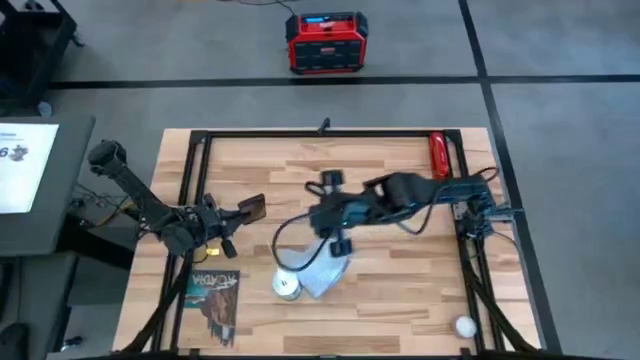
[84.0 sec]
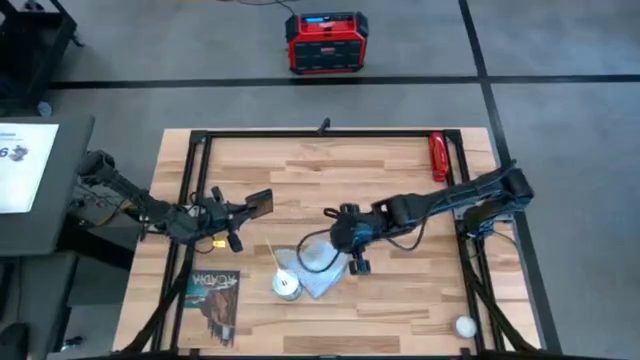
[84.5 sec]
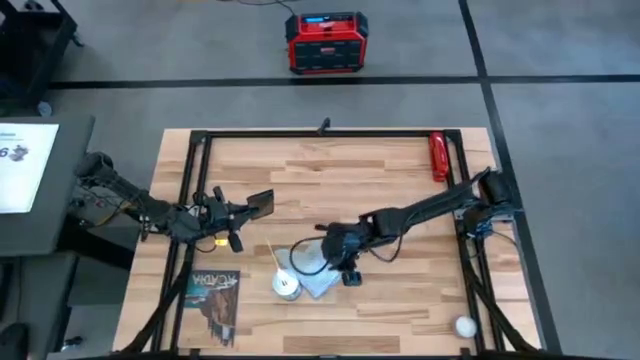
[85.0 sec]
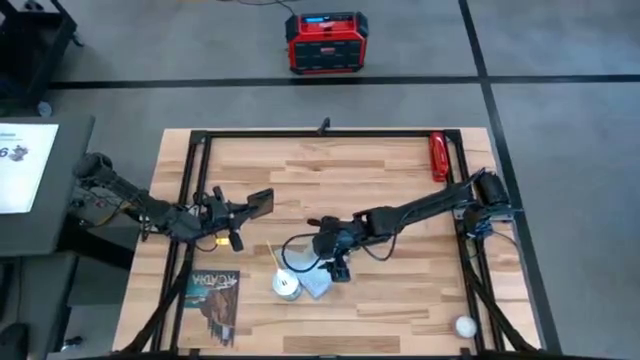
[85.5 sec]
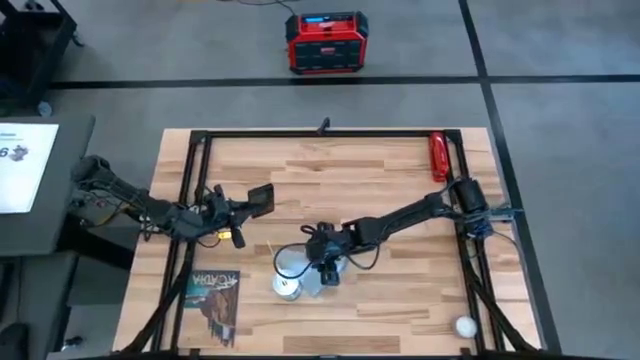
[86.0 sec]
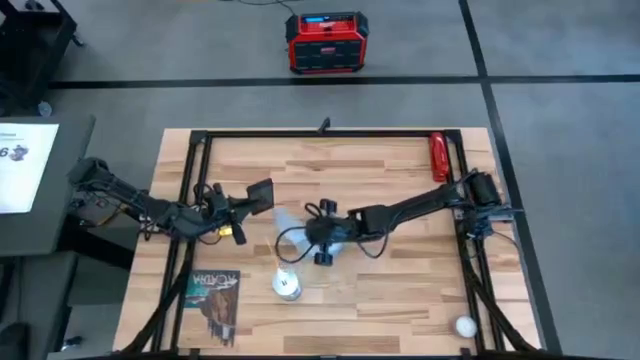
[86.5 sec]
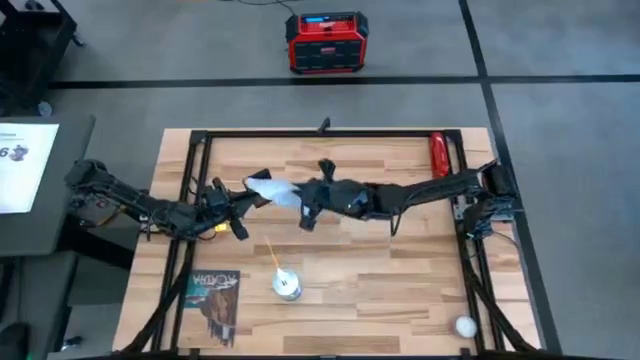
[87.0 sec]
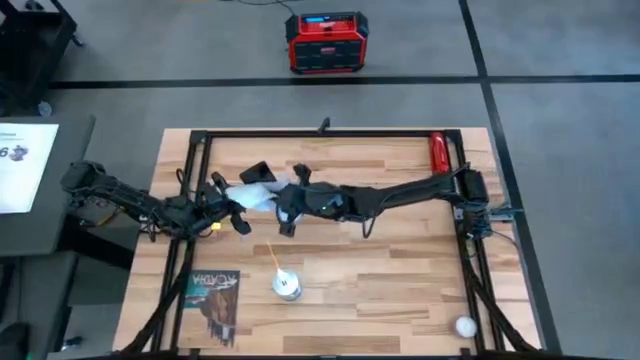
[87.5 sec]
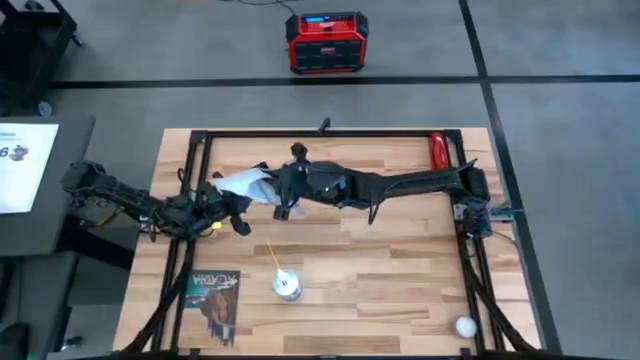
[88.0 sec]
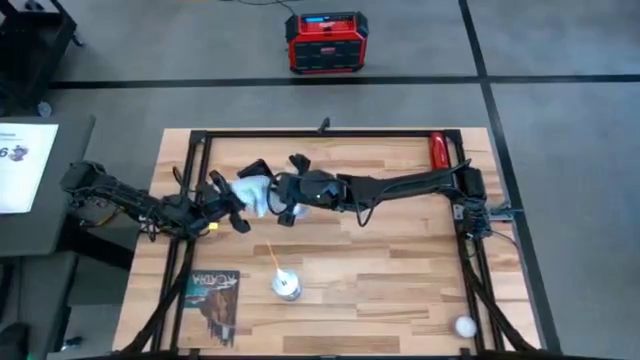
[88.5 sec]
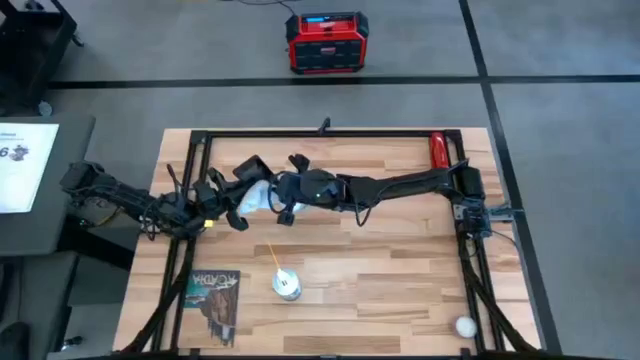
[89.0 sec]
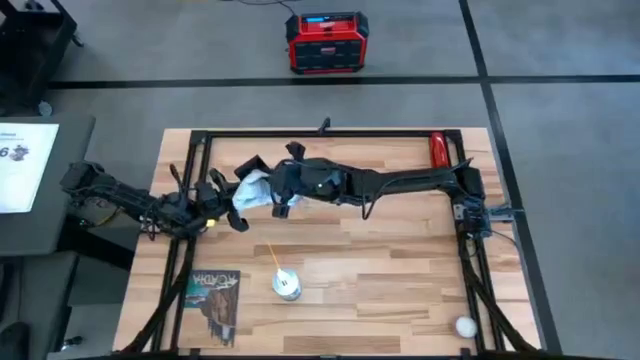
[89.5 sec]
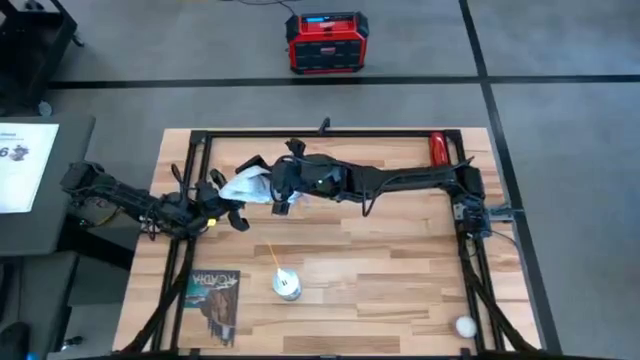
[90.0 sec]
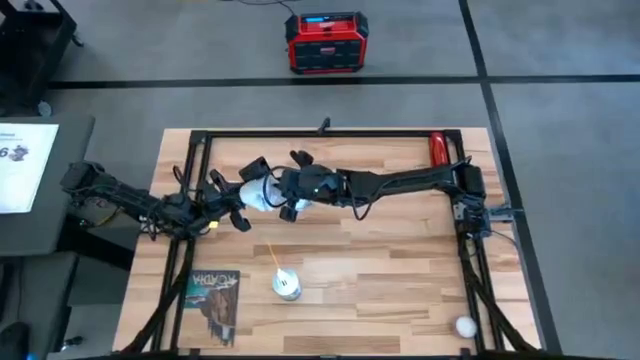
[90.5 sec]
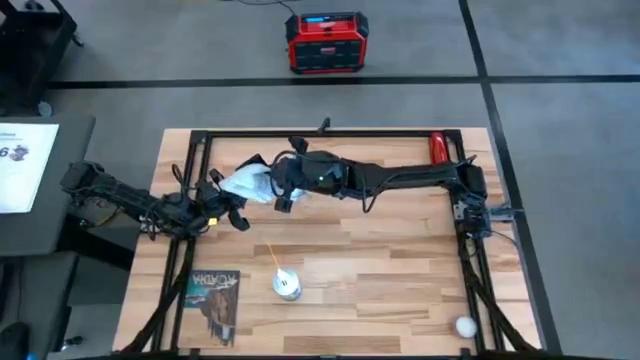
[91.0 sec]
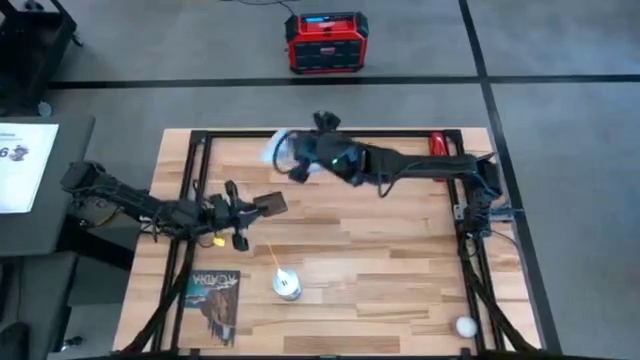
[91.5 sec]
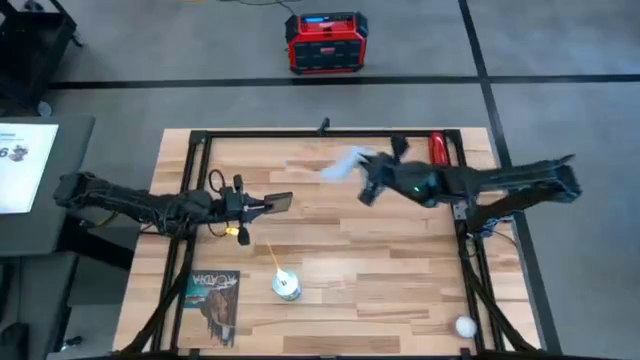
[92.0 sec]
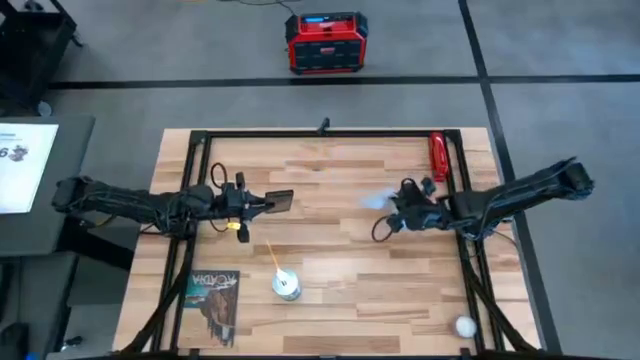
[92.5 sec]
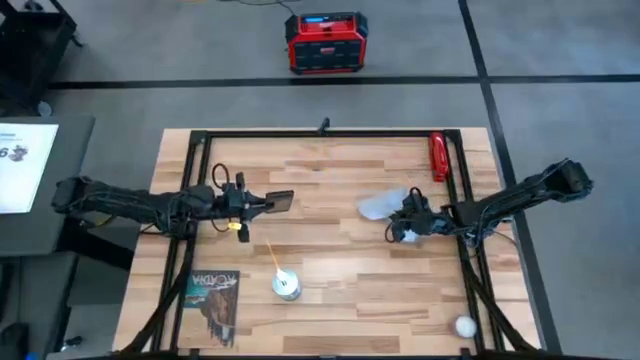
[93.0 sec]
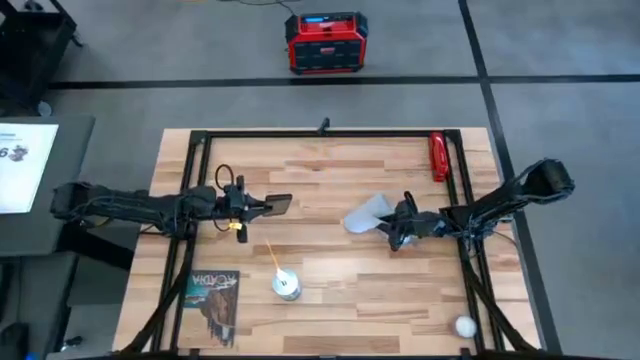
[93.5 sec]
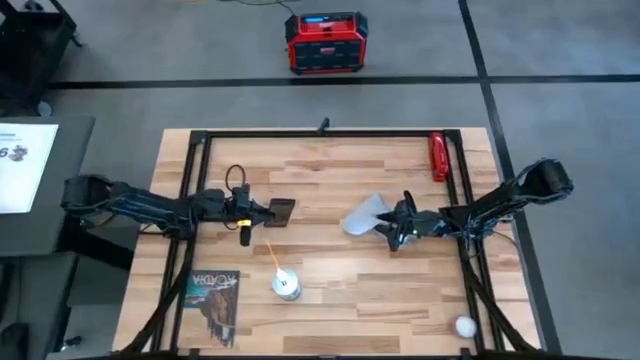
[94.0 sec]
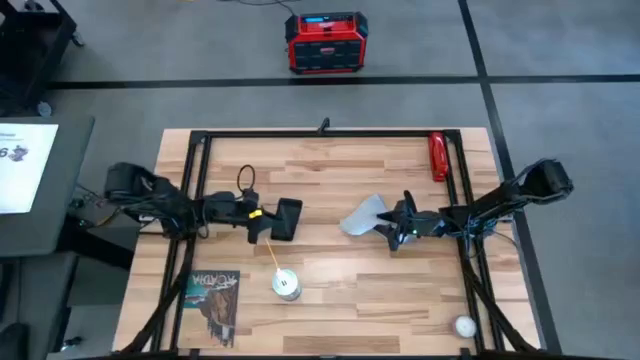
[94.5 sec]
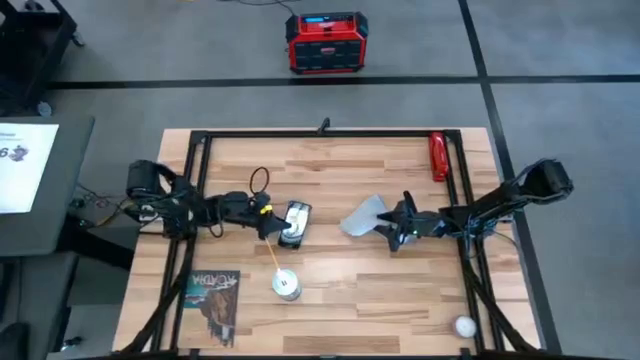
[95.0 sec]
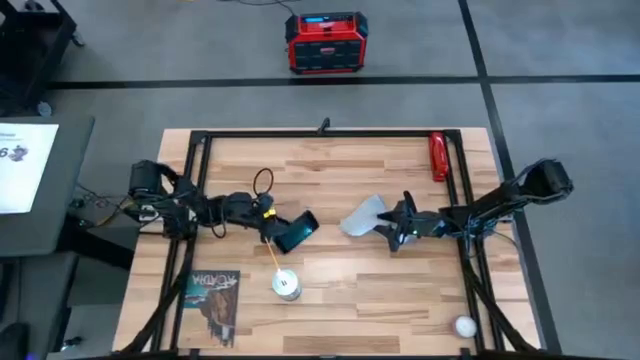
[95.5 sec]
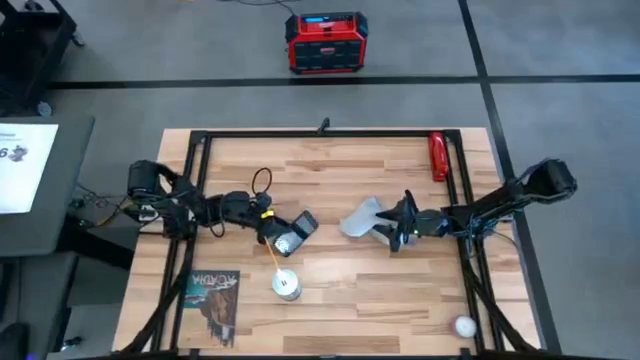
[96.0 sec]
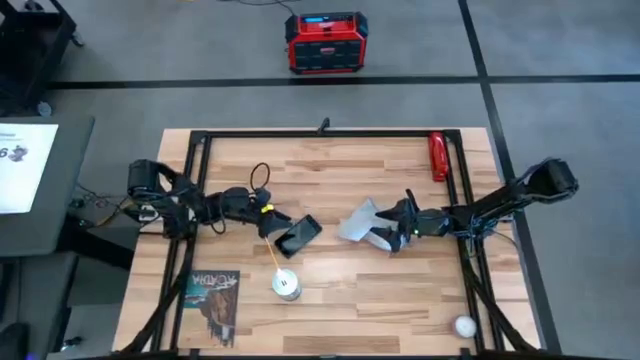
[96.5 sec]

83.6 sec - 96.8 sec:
Task: Apply microfiber cloth
Wipe the front of the cellphone with the microfiber cloth

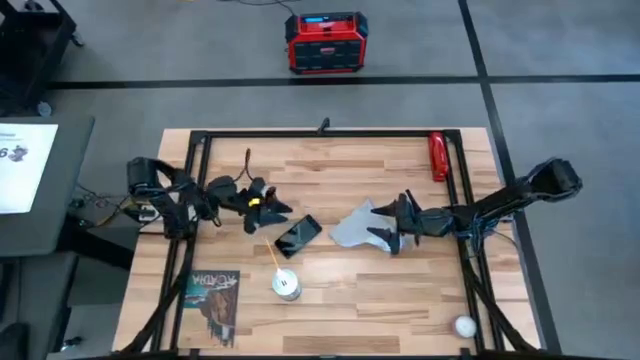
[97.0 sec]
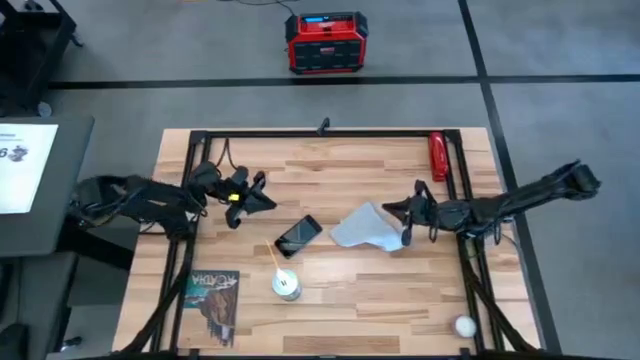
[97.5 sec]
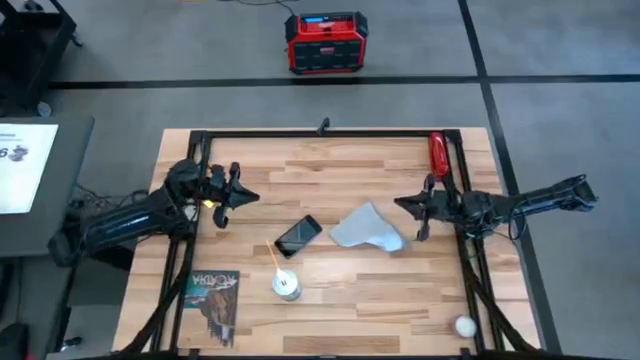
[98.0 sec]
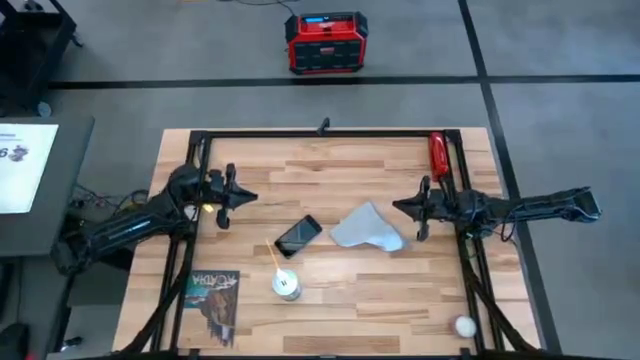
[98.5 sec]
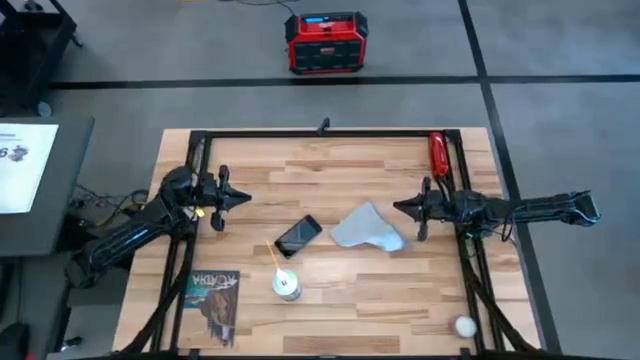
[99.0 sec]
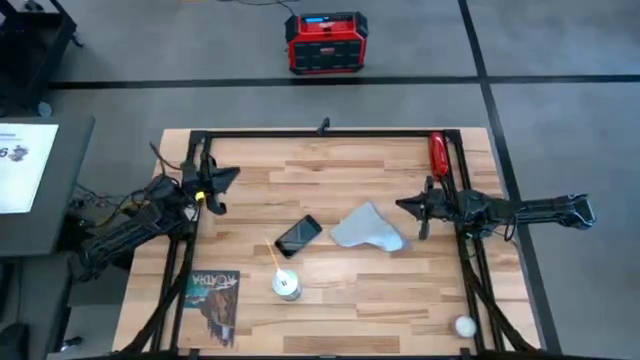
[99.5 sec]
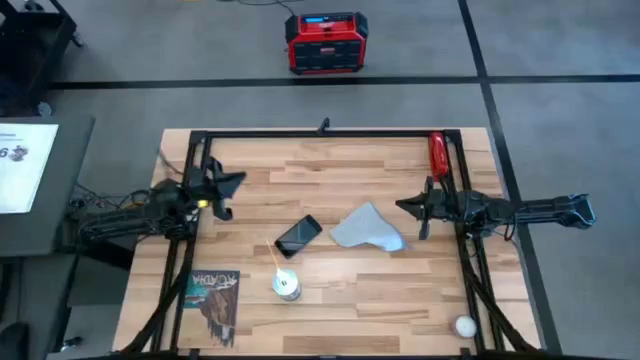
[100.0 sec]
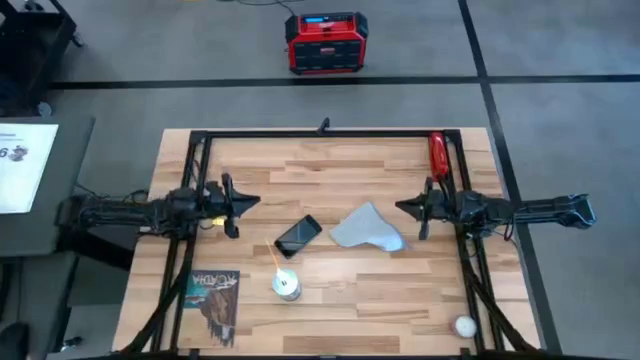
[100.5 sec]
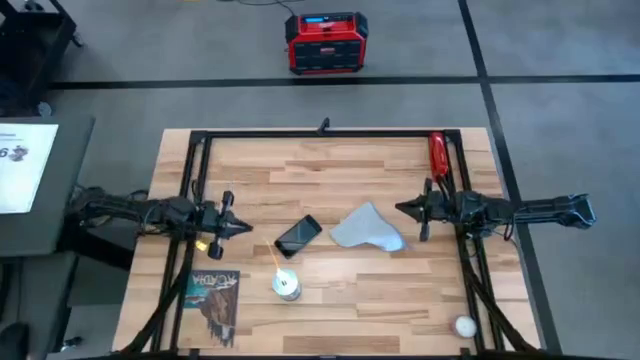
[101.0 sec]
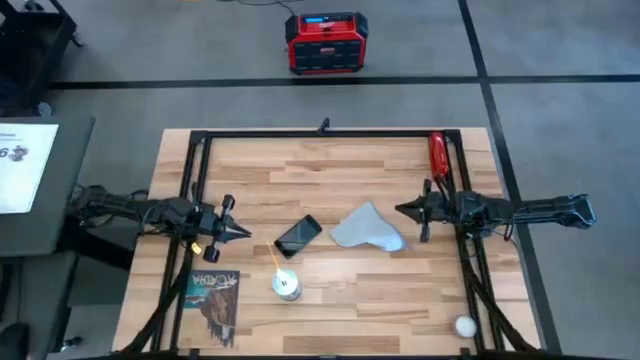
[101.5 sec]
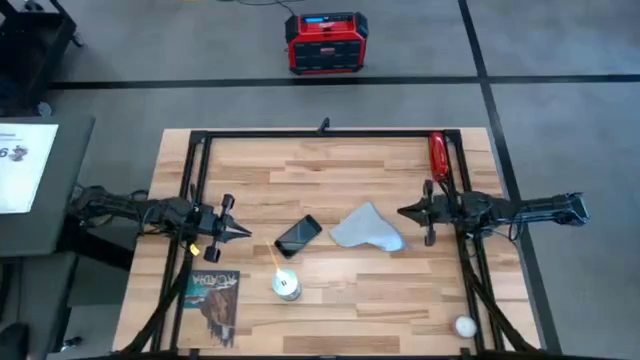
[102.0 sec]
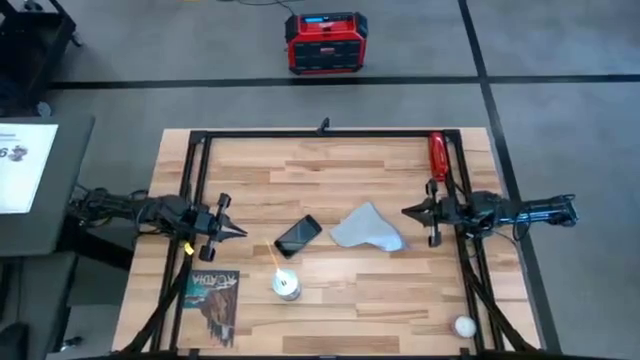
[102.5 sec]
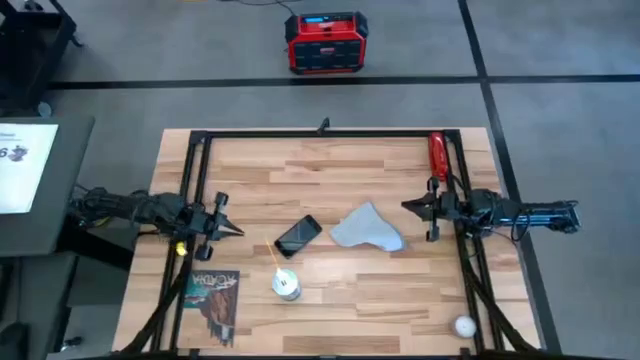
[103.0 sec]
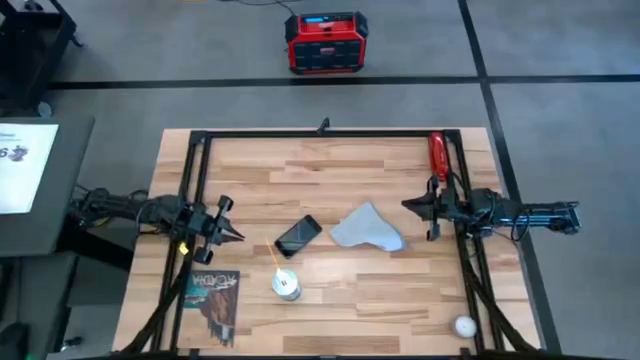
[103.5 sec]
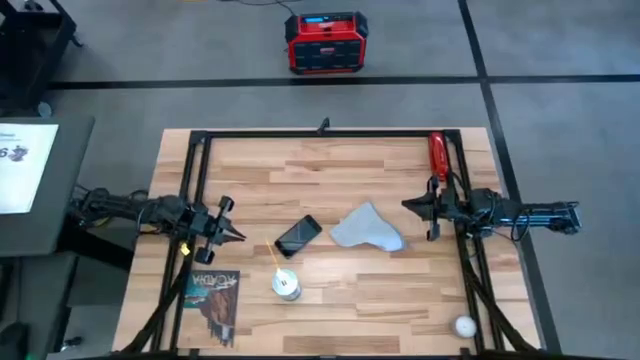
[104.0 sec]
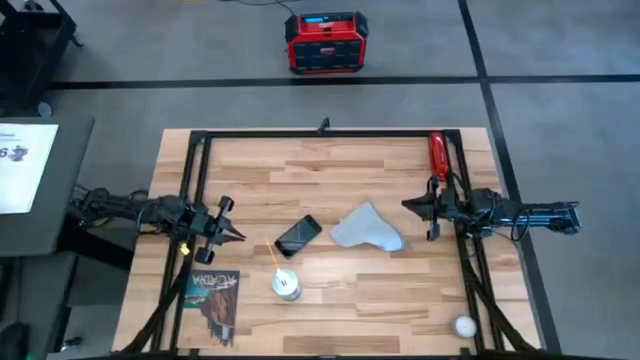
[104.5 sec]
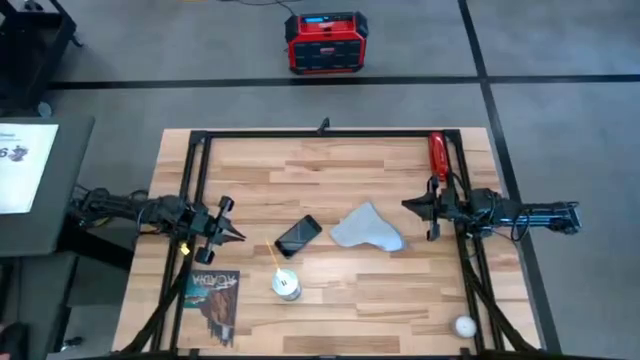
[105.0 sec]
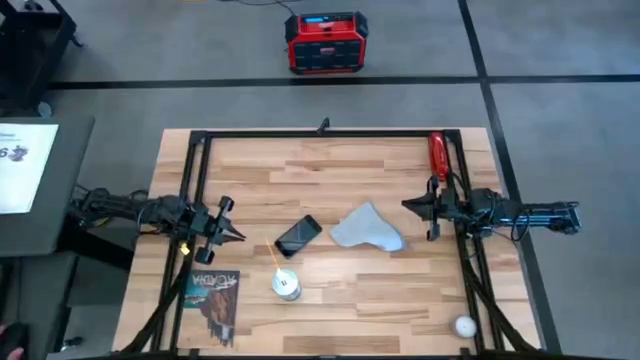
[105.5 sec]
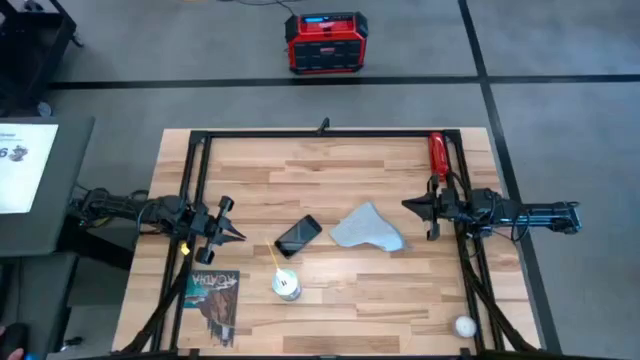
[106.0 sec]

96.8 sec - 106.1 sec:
Return to Home Position
